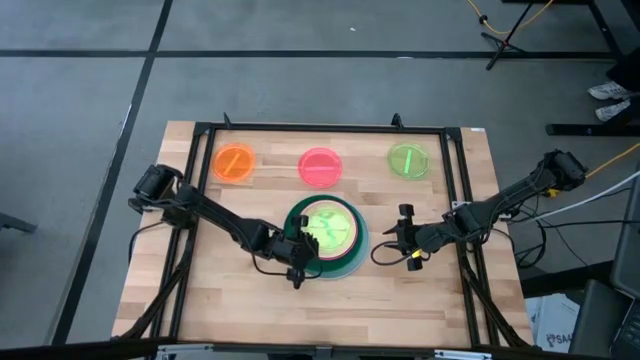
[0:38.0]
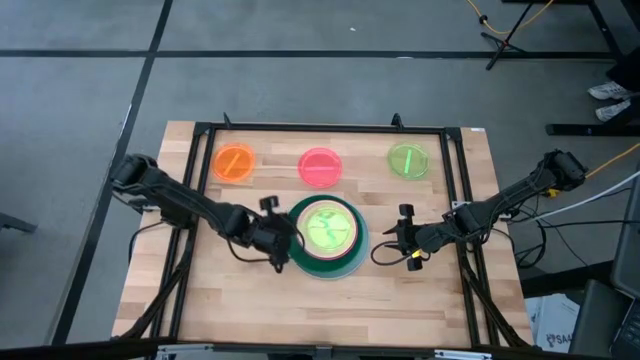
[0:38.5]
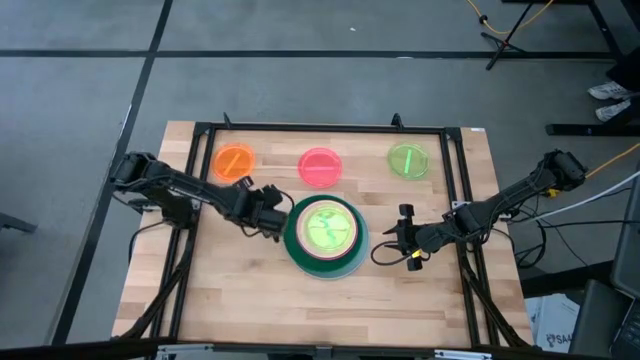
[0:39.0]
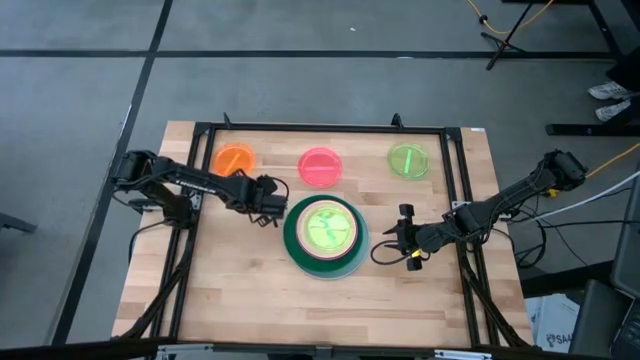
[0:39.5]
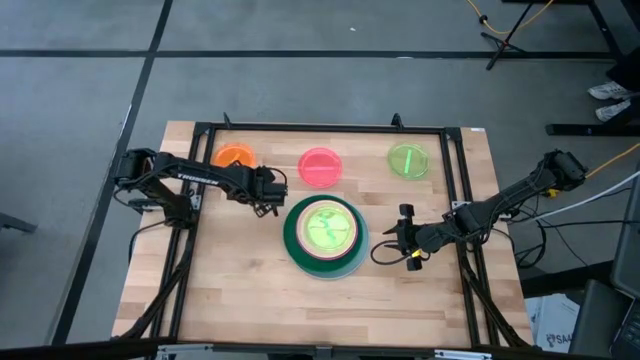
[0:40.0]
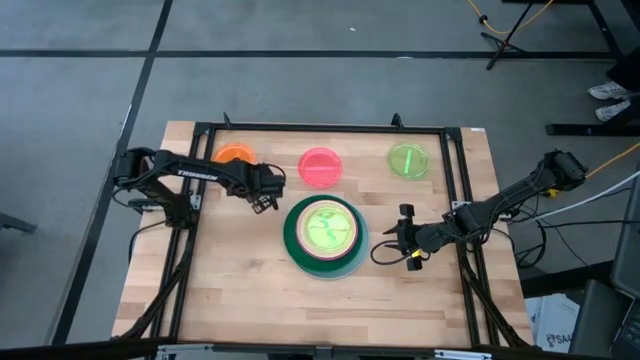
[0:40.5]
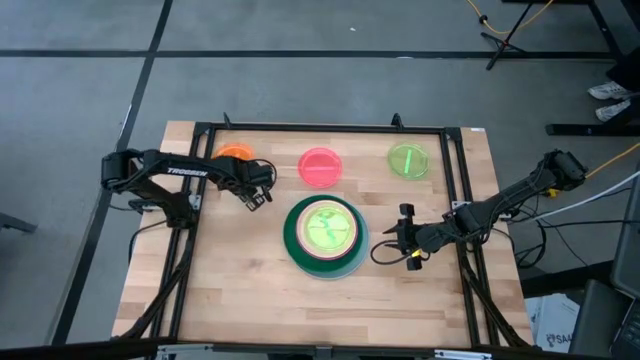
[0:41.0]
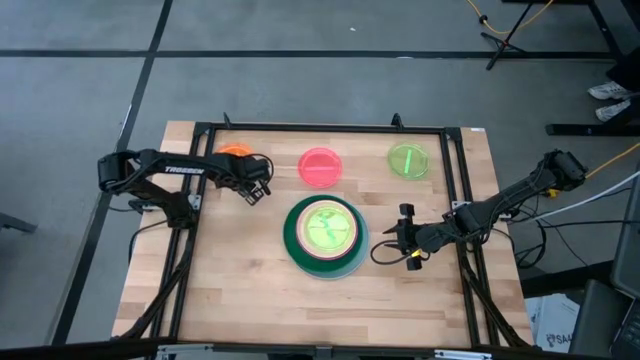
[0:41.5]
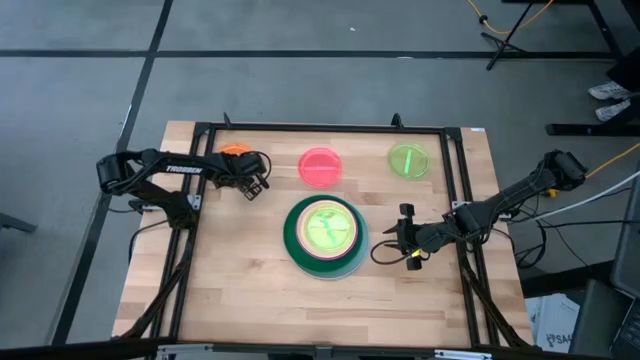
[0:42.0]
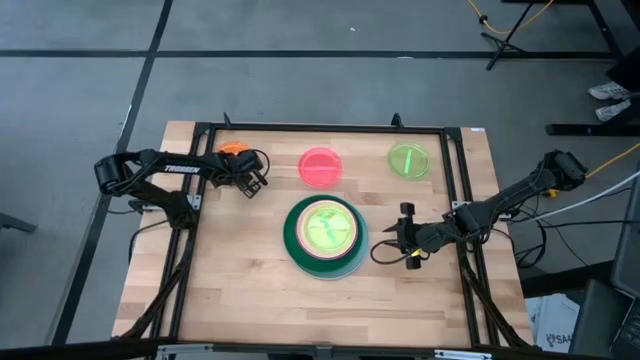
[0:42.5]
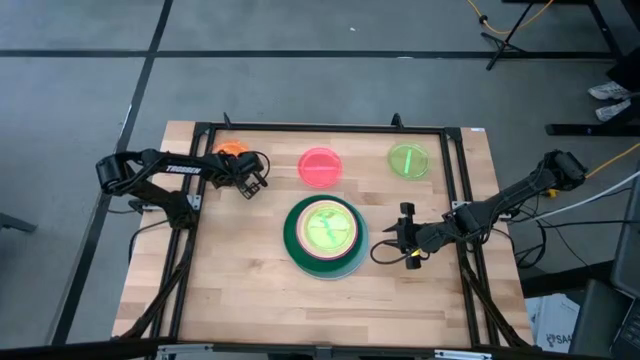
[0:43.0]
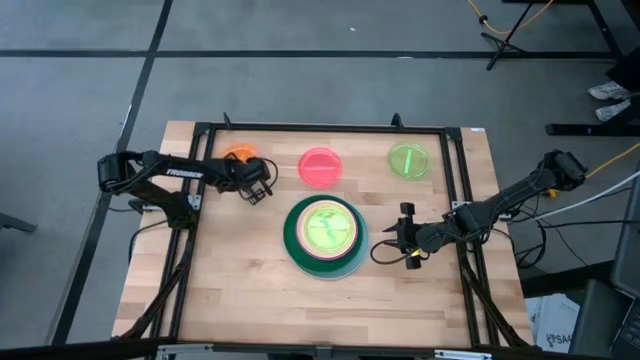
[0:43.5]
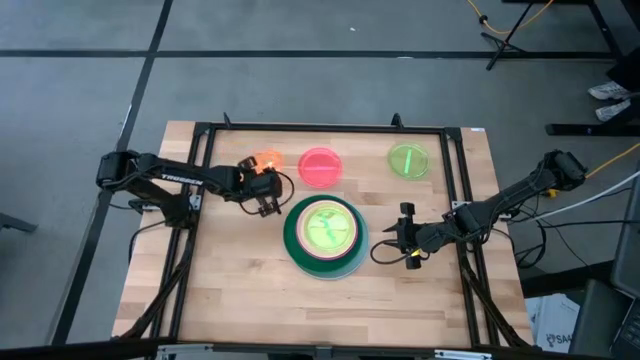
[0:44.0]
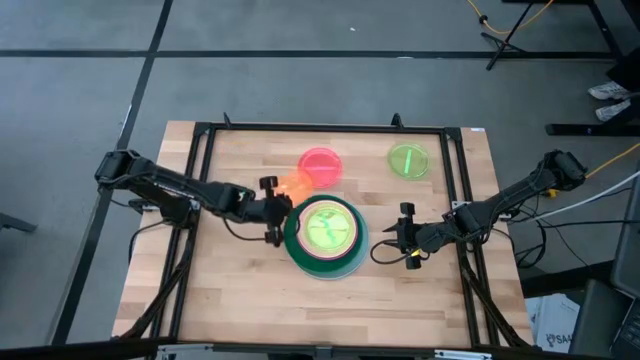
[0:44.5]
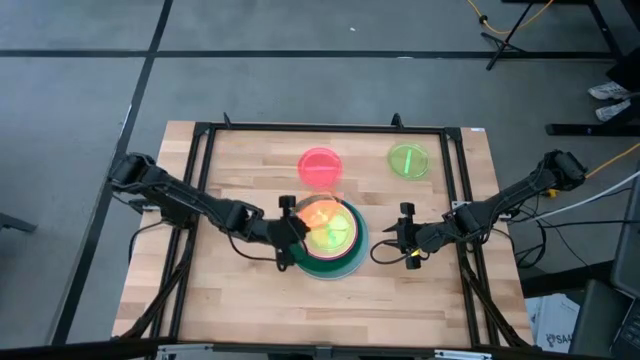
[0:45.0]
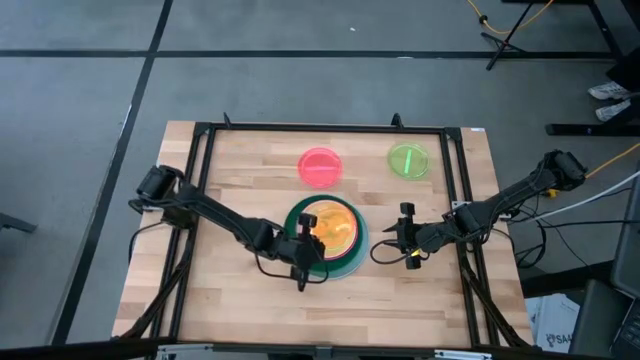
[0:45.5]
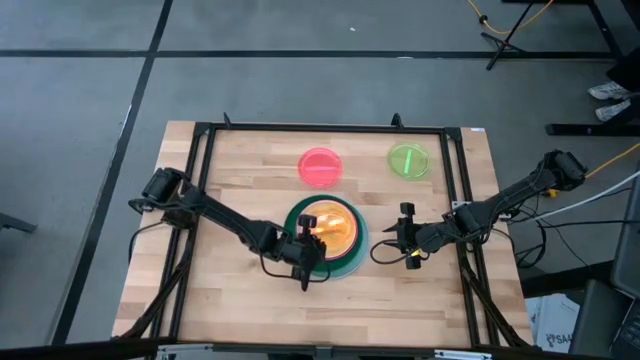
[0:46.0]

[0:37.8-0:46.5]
Task: Stack plastic plates
Stack the orange transparent plate on top of the transparent green plate

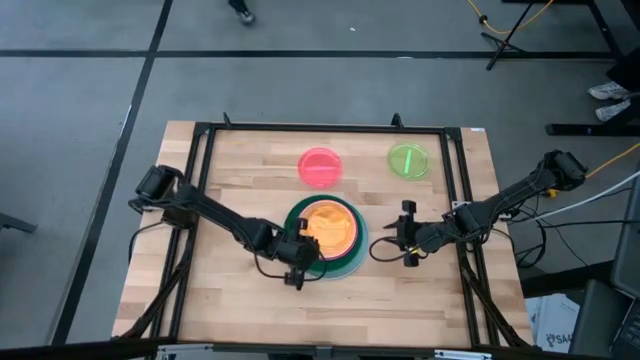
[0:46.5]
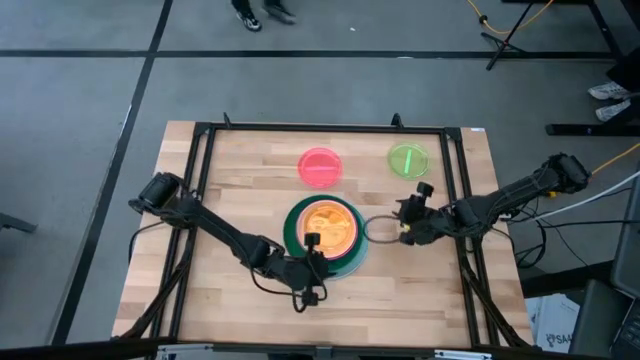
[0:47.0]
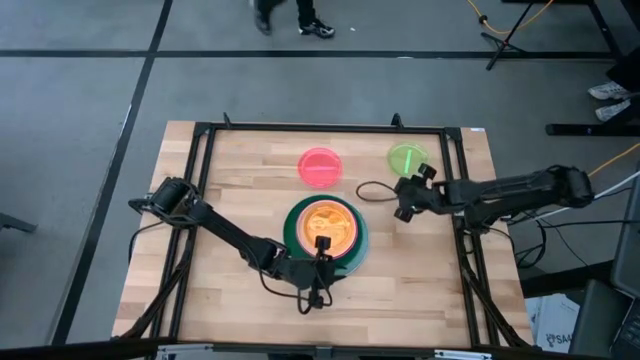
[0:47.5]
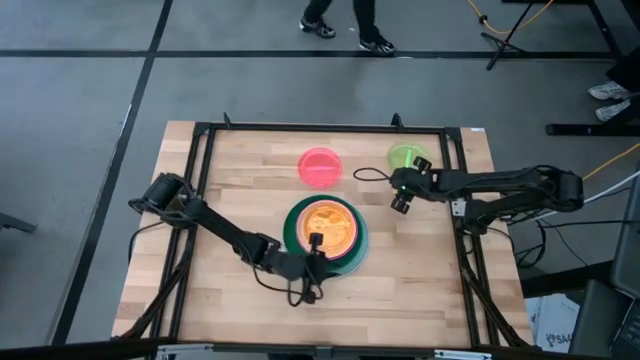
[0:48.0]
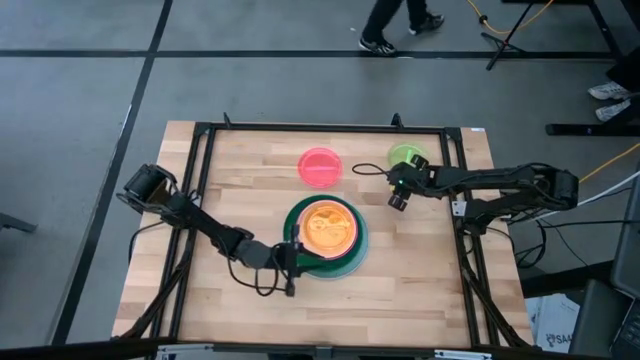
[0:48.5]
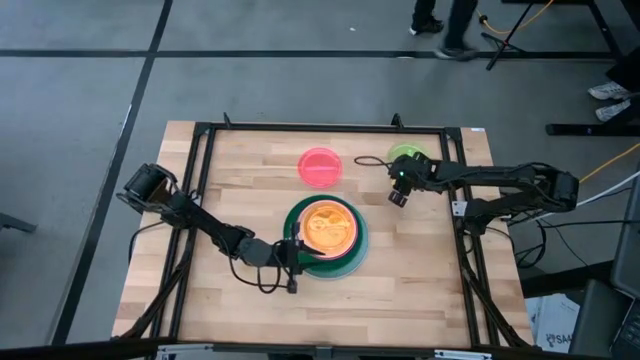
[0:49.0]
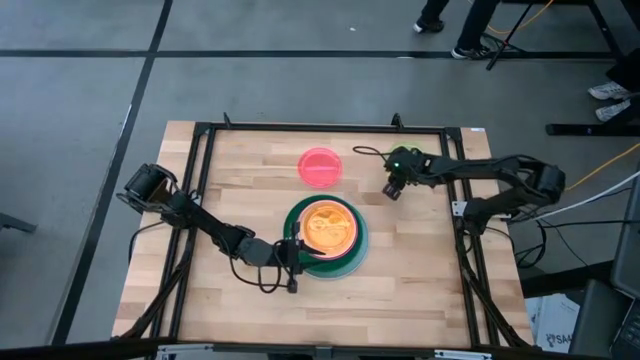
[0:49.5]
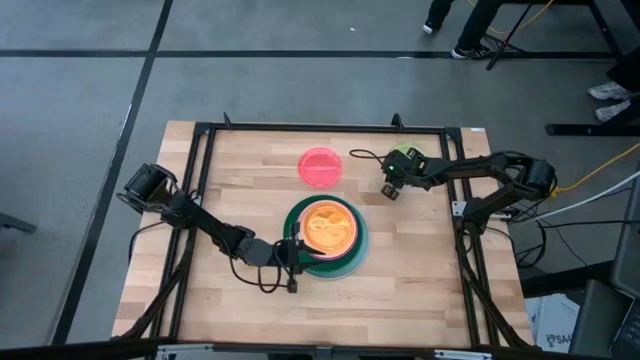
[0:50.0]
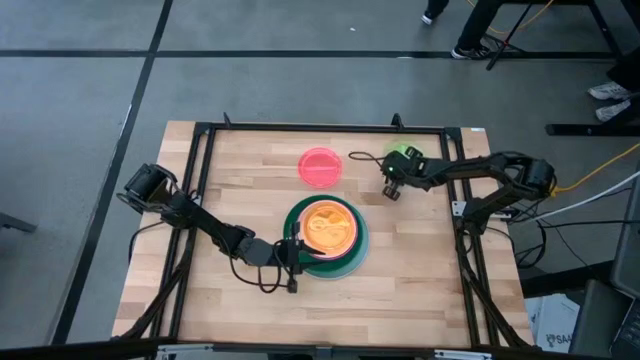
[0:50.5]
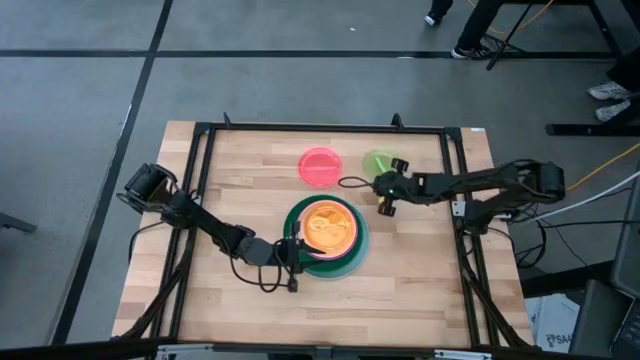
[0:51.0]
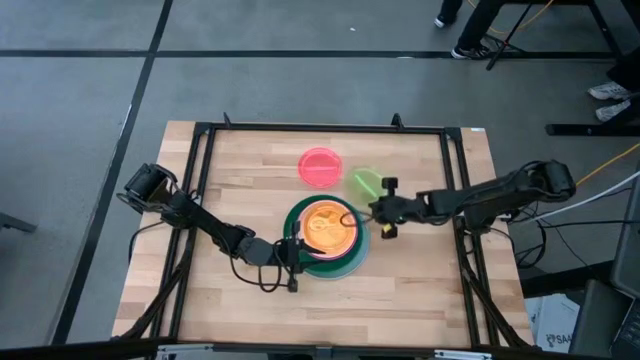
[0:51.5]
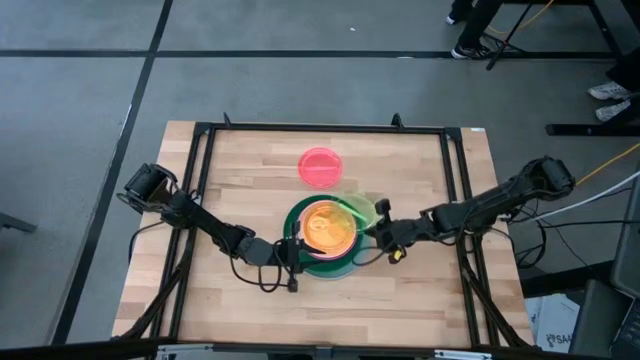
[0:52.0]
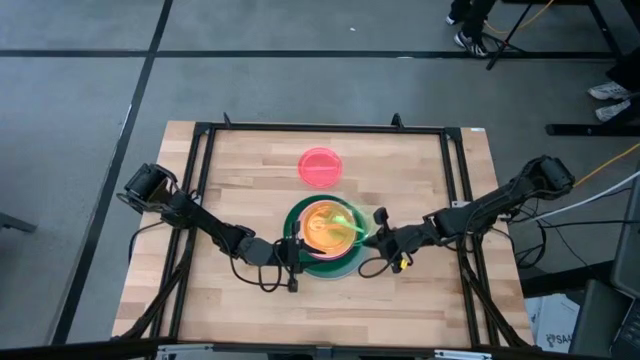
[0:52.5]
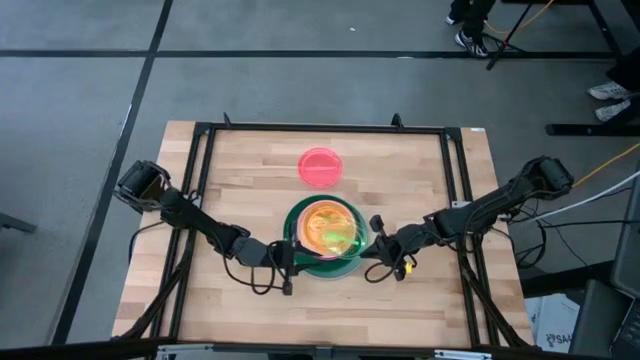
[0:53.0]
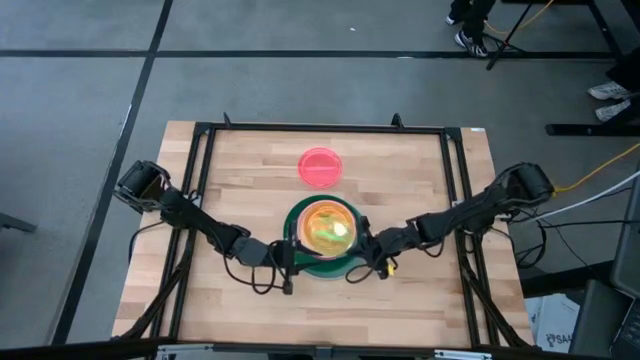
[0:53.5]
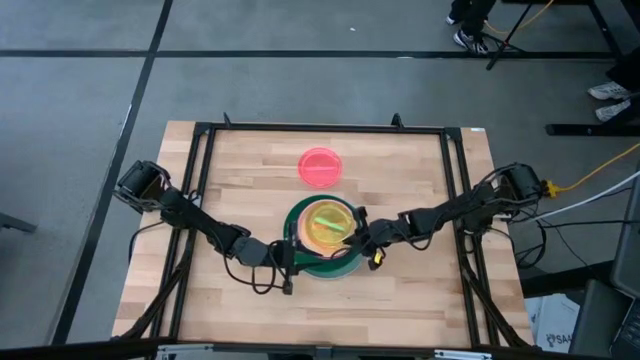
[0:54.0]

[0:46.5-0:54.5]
Stack the transparent green plate on top of the transparent orange plate

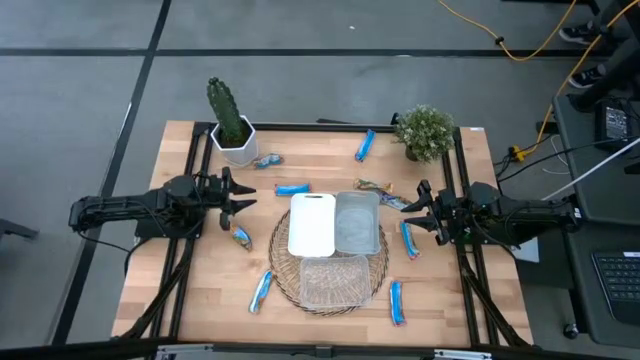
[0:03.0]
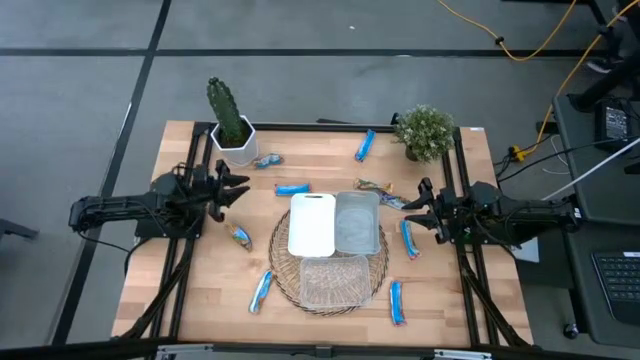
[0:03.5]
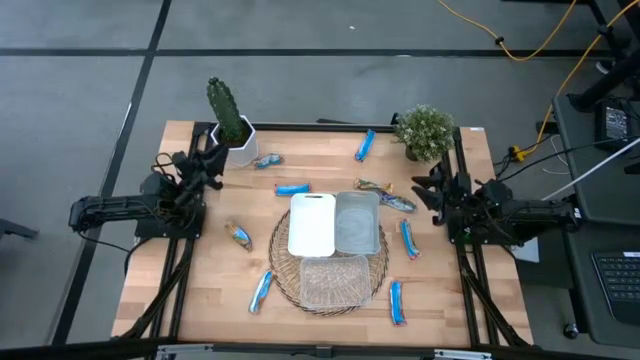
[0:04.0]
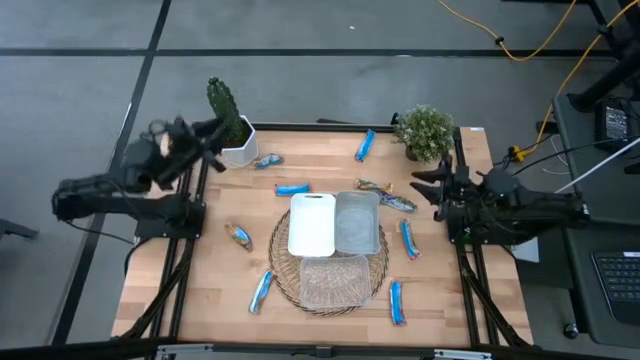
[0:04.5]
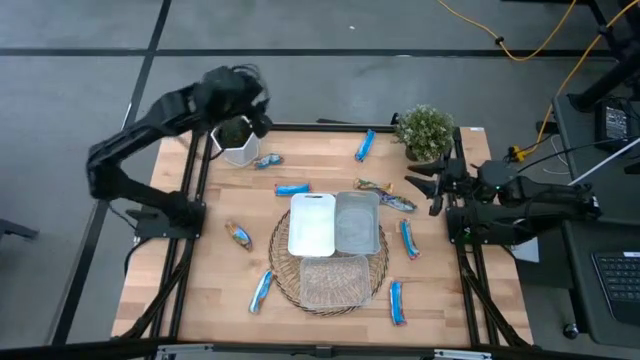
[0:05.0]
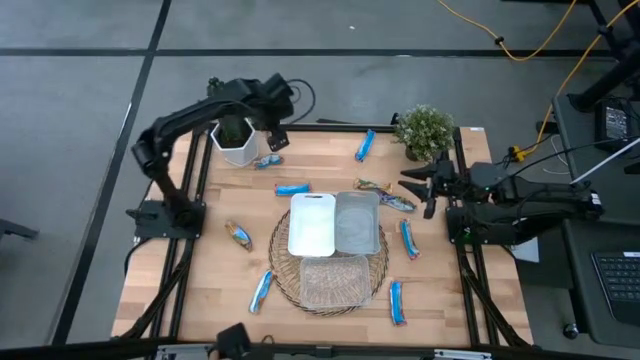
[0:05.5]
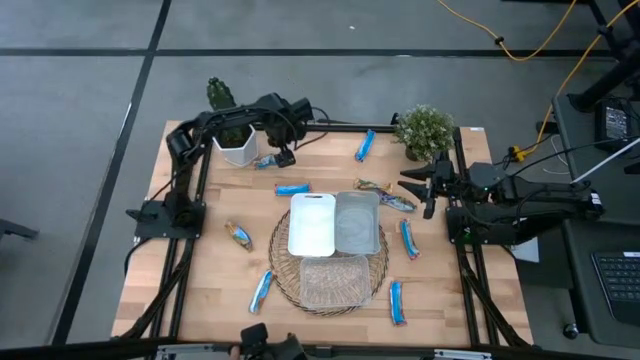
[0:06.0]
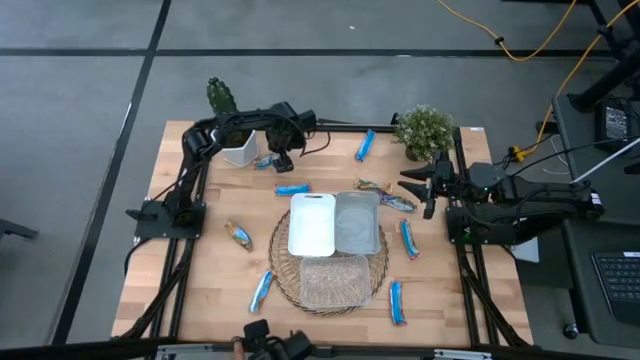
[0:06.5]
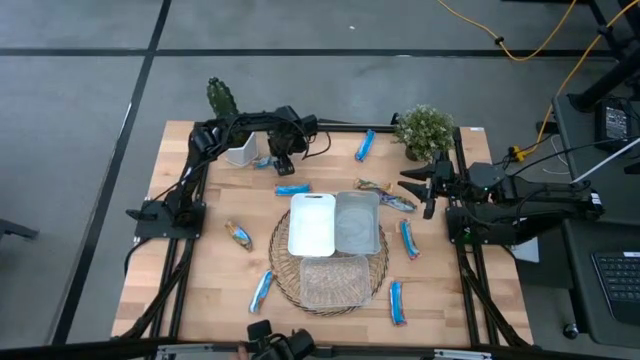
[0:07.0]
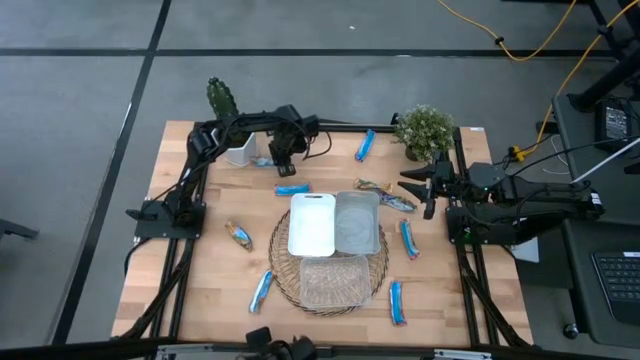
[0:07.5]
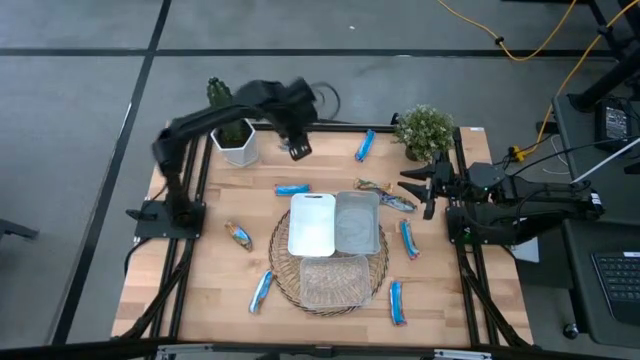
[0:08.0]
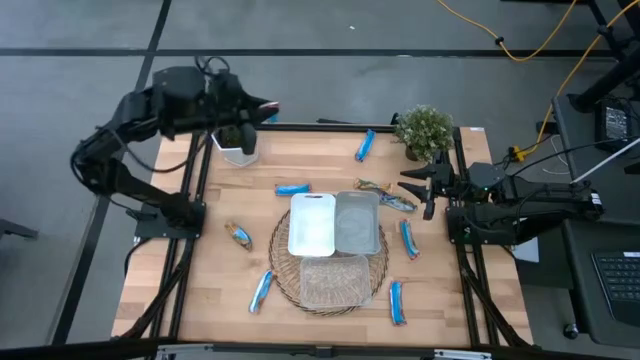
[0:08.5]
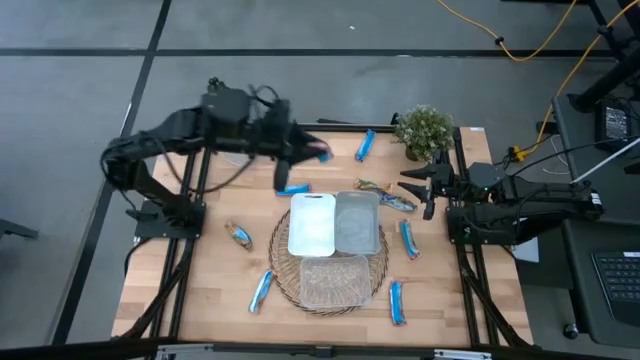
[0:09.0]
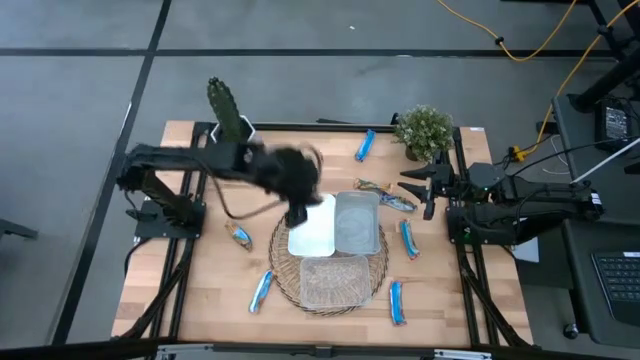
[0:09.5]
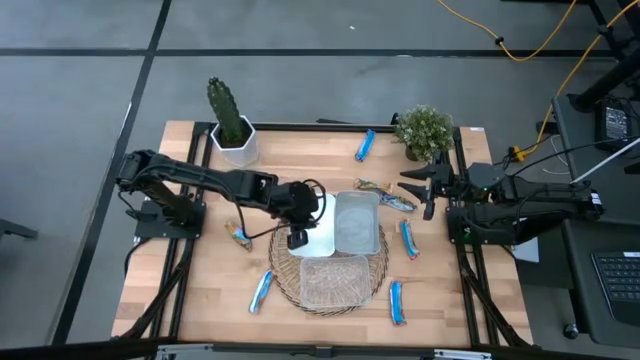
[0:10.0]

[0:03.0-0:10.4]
Task: Pick and place Granola Bars by type
Put the red granola bar into the white bin
